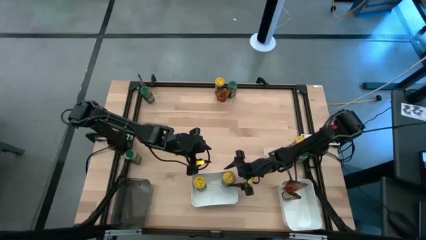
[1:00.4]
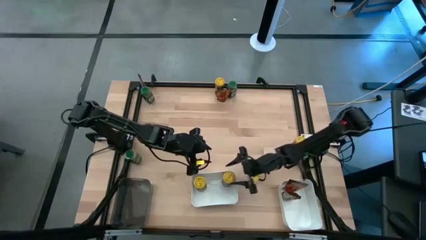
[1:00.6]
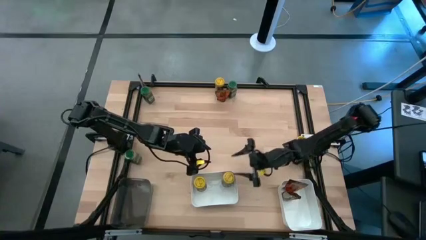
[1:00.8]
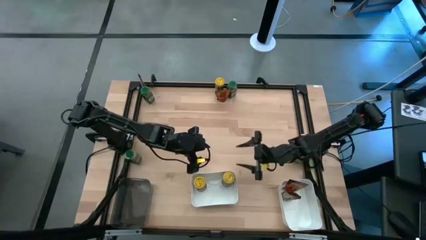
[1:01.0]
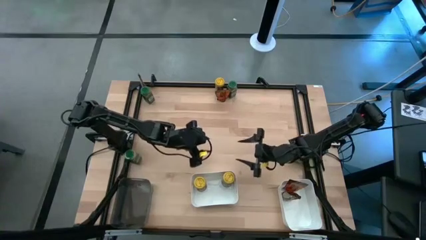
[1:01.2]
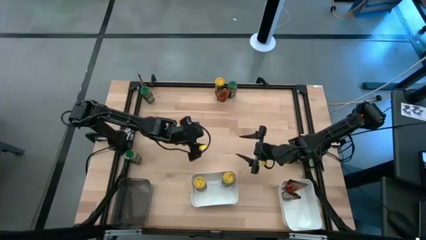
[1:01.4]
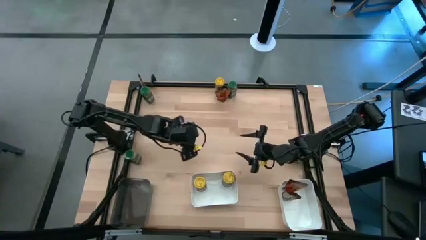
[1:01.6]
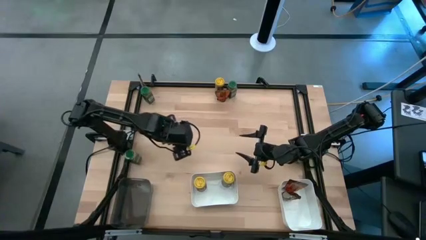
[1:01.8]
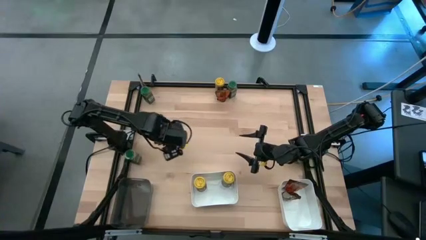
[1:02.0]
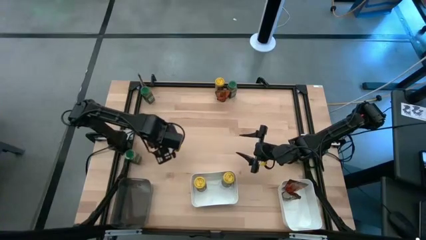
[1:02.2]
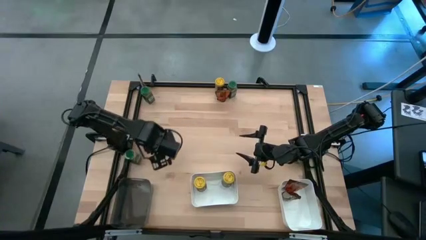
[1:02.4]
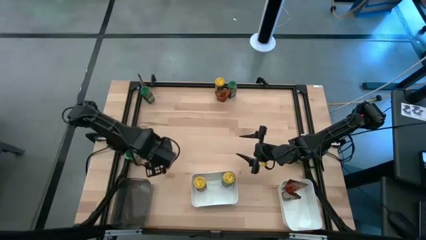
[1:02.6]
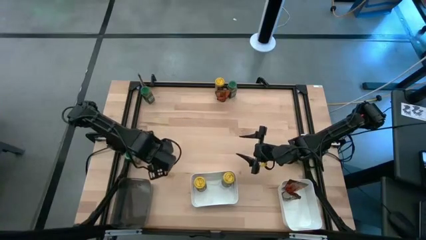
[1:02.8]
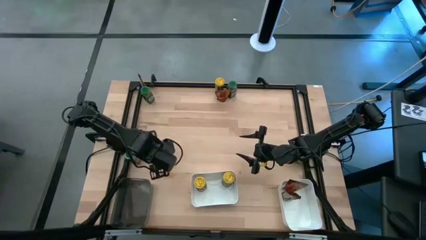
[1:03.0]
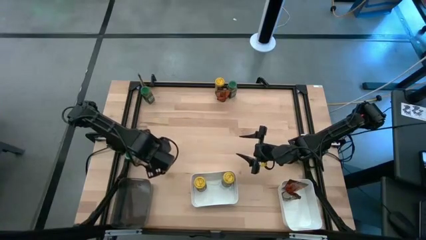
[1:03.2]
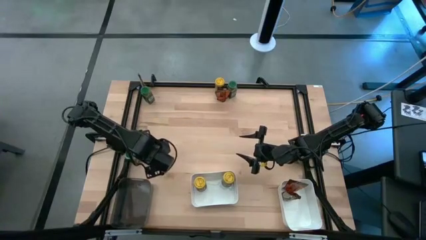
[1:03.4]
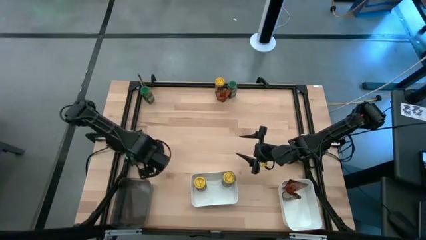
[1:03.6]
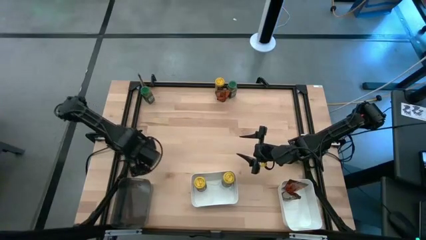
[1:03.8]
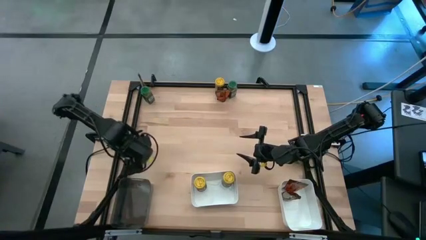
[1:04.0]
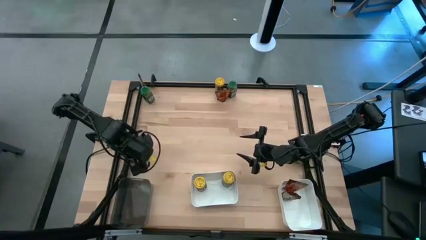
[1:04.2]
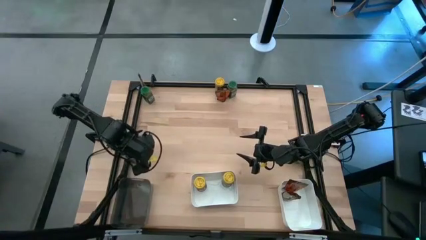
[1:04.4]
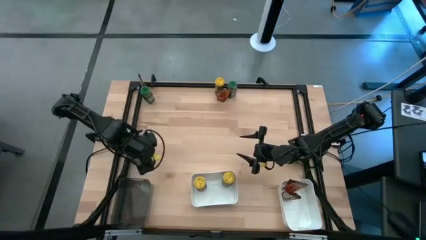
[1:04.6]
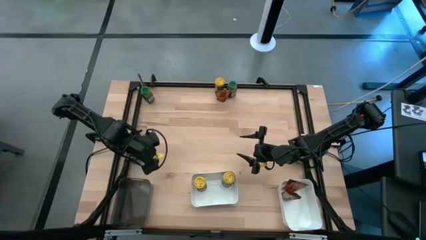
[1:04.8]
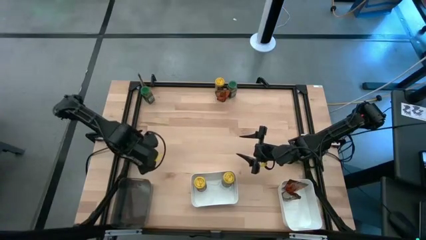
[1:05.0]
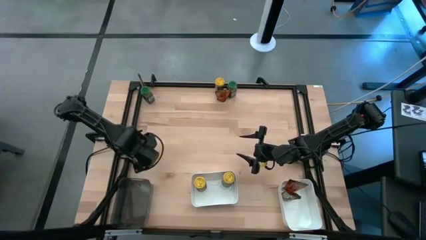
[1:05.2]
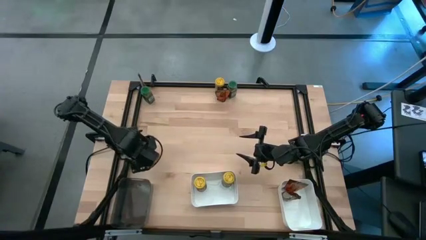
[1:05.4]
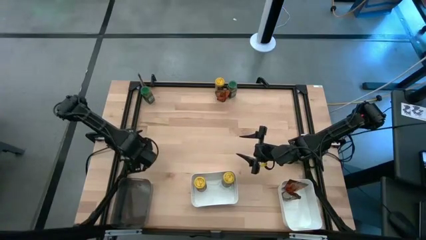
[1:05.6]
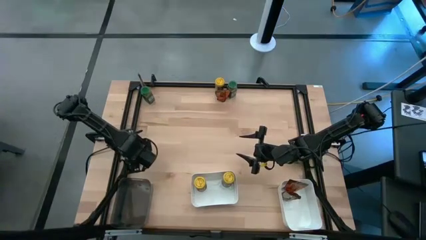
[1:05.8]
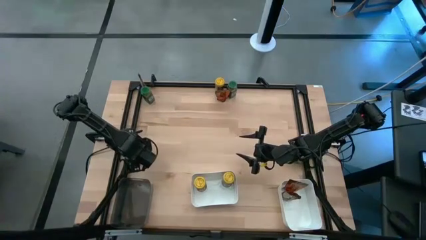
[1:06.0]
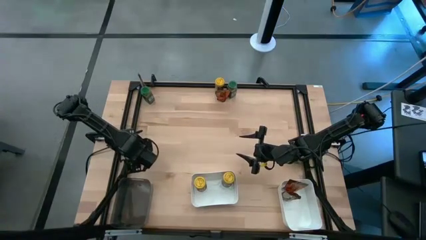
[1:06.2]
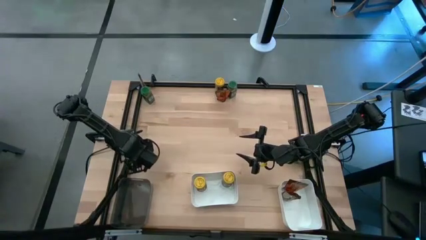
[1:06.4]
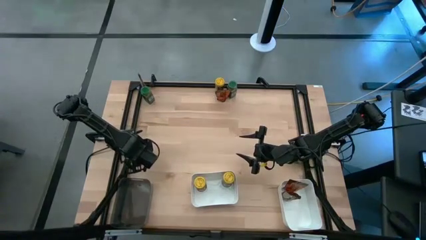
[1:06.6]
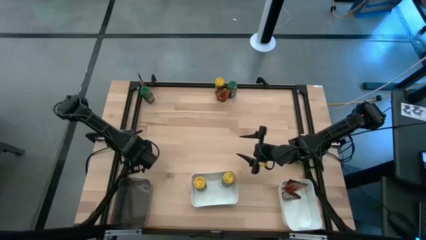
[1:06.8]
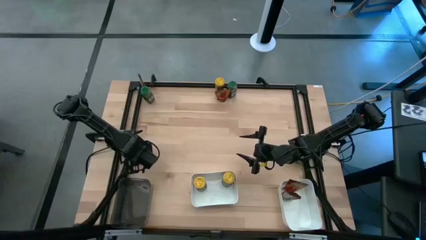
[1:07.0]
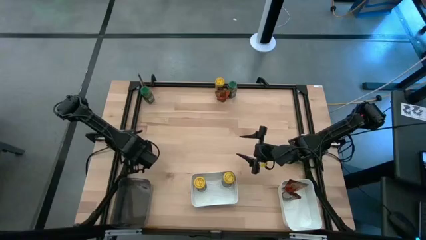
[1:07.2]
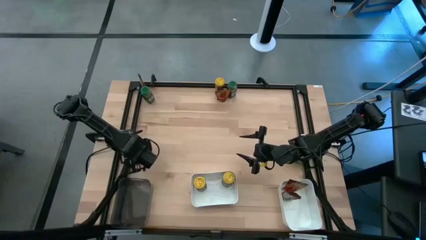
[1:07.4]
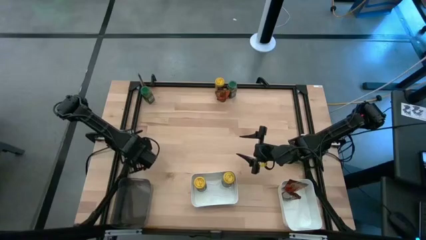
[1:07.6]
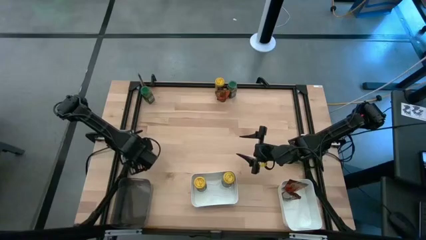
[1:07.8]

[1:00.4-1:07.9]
Task: Sort spices by type
Put the bottom left green seasoning bottle into the black bin

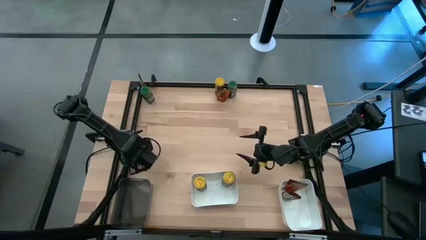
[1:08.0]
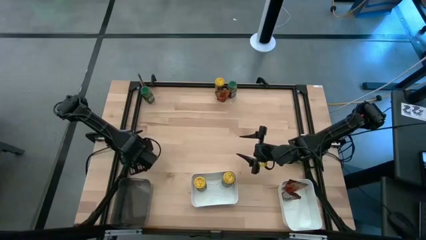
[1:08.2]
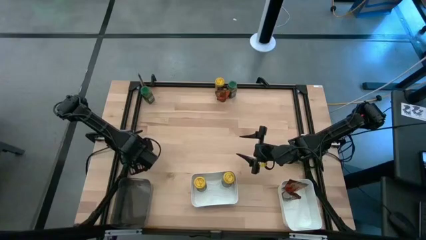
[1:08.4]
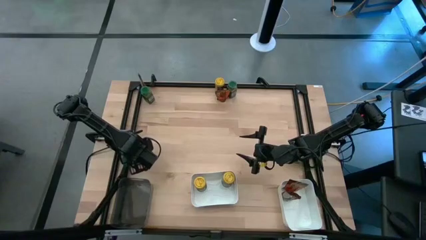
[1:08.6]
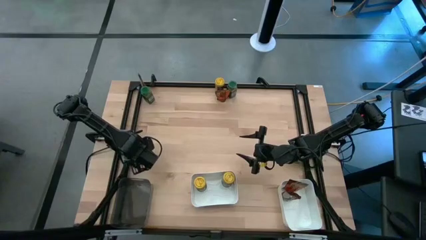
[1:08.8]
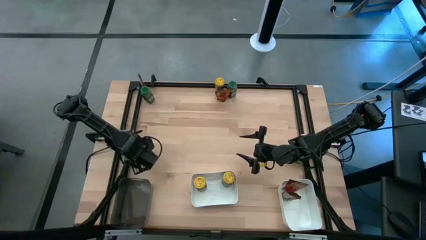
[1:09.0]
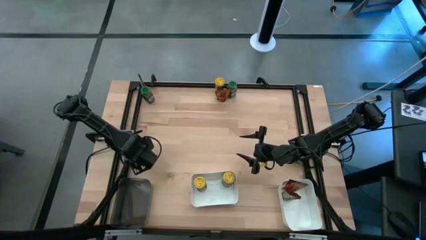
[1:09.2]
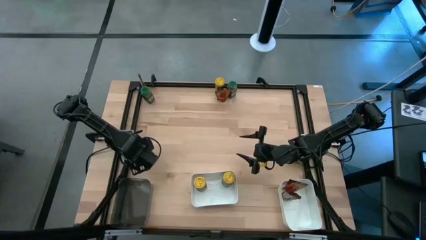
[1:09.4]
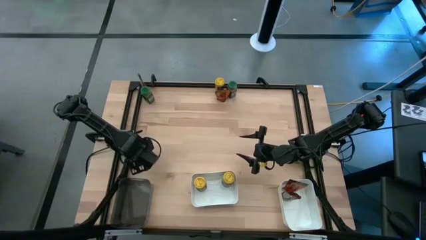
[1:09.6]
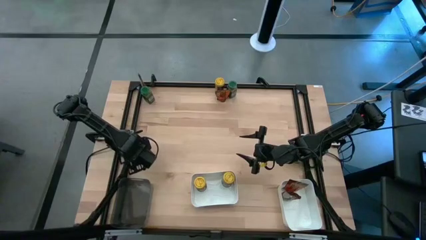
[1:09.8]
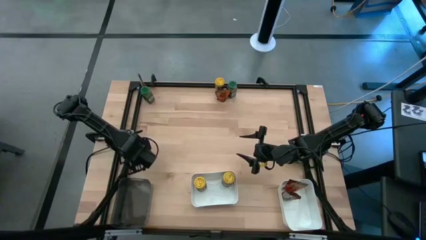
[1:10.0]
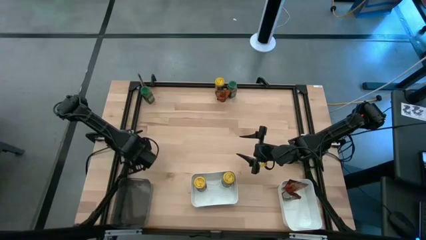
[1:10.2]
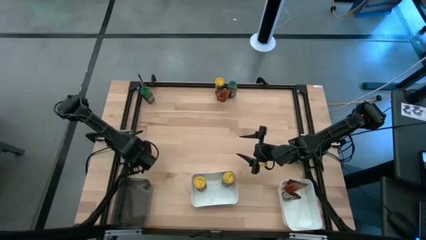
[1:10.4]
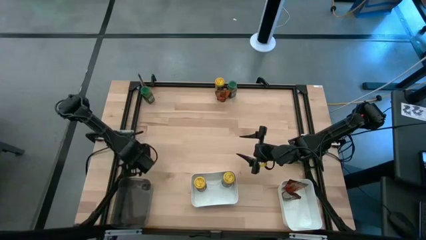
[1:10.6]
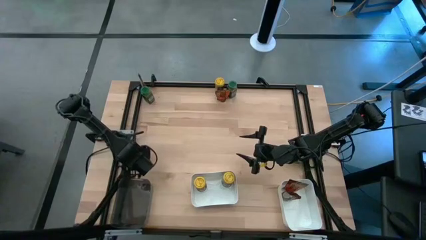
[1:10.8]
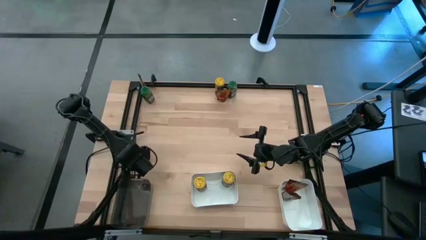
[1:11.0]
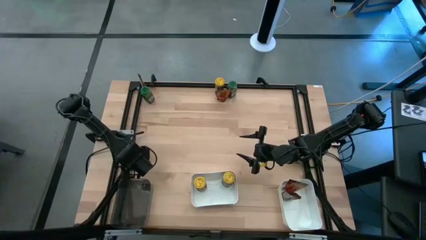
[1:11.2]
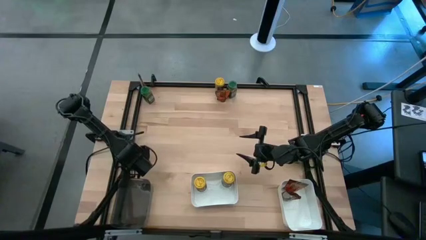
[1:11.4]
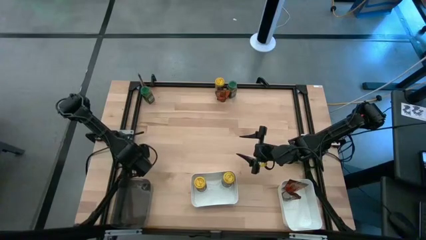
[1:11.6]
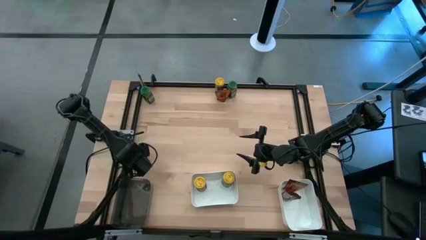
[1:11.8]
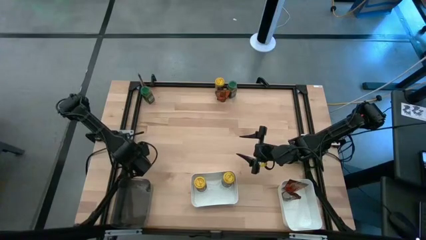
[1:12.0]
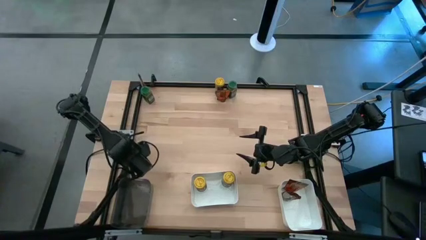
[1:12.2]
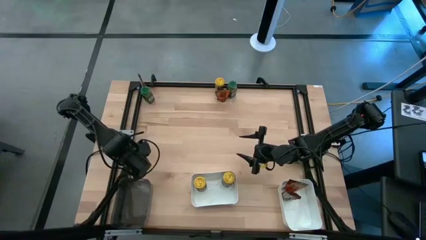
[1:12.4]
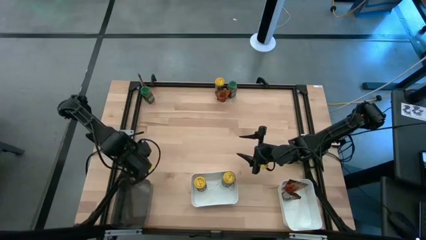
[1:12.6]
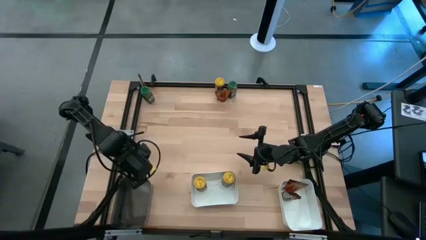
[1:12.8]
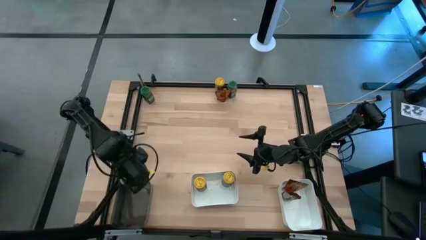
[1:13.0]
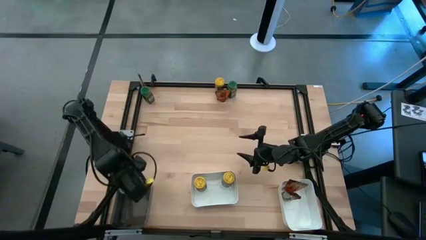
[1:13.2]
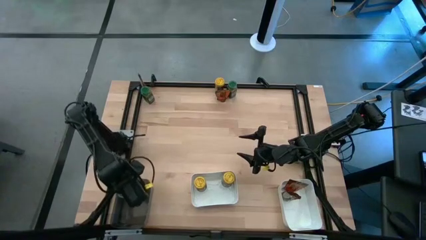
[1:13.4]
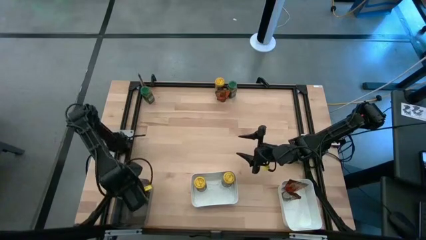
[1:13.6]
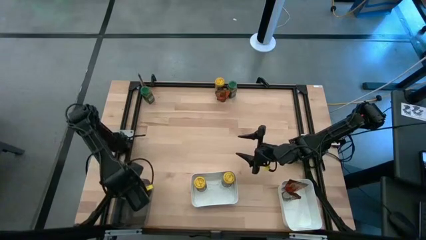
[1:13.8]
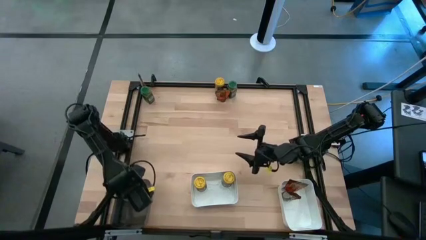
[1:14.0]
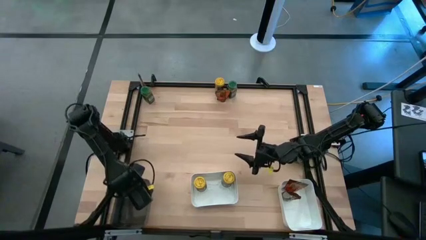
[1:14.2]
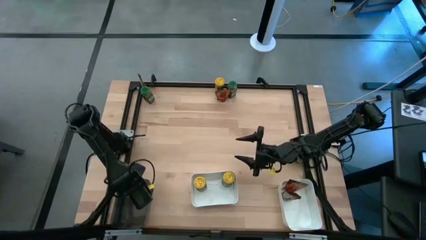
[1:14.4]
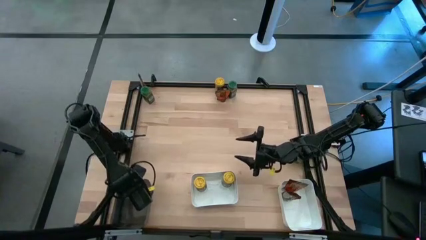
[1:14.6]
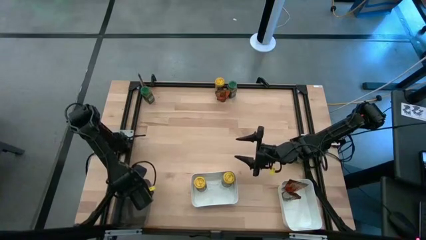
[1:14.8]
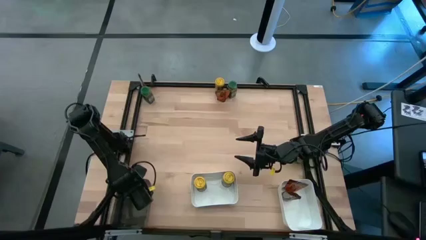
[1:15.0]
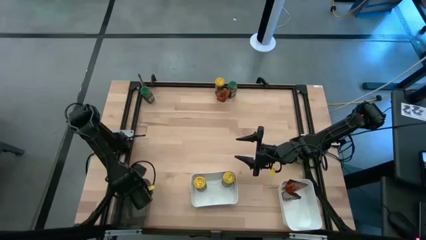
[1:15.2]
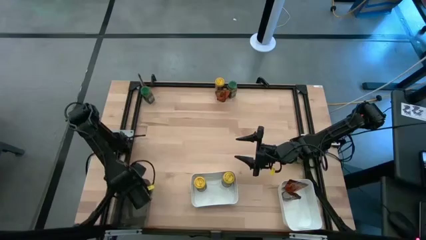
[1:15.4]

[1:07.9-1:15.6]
Put the bottom left green seasoning bottle into the black bin

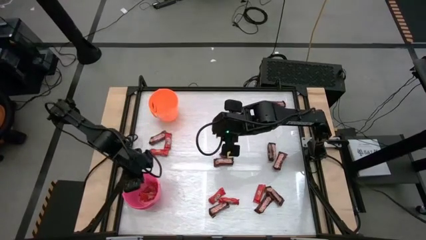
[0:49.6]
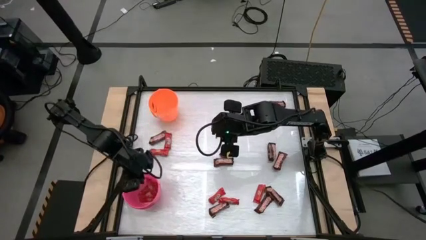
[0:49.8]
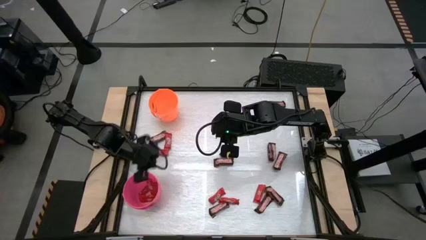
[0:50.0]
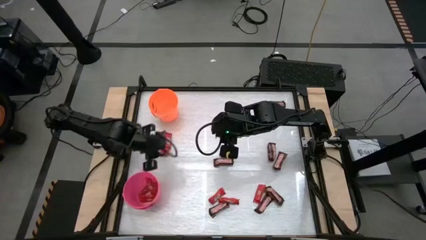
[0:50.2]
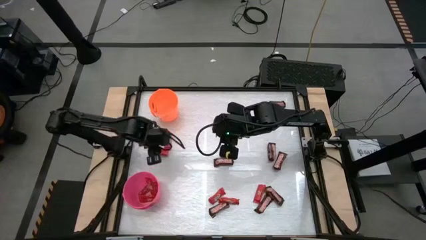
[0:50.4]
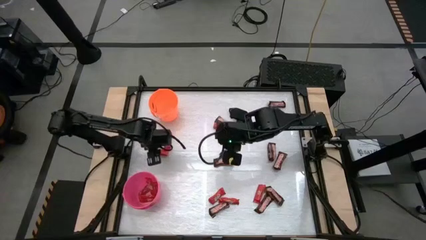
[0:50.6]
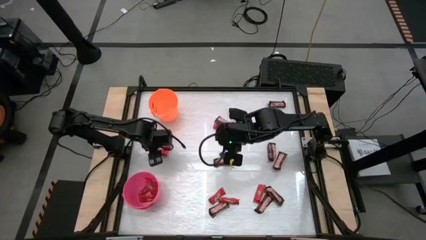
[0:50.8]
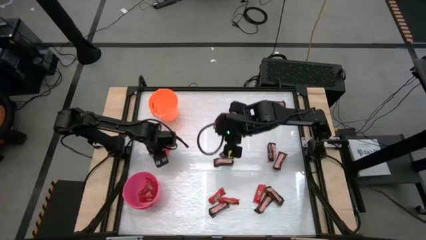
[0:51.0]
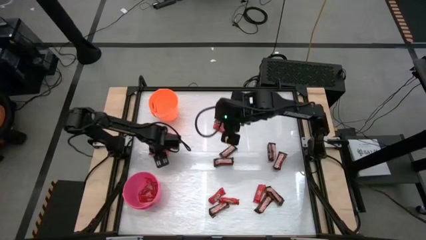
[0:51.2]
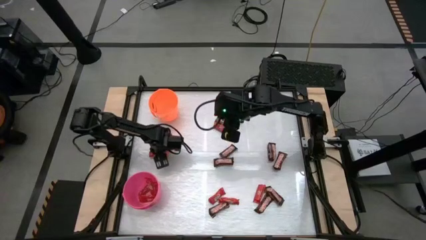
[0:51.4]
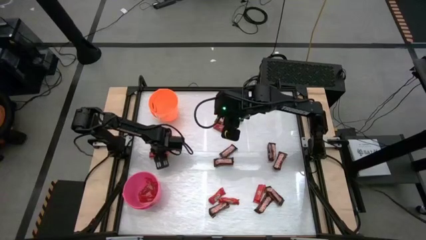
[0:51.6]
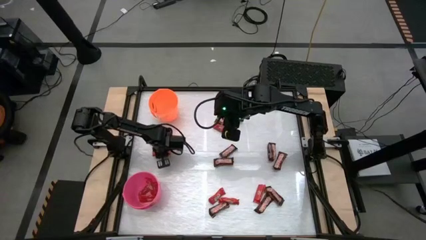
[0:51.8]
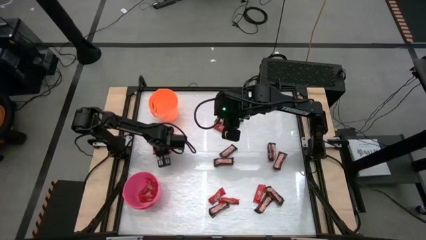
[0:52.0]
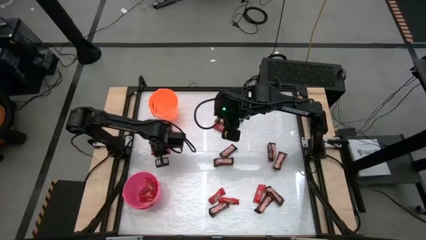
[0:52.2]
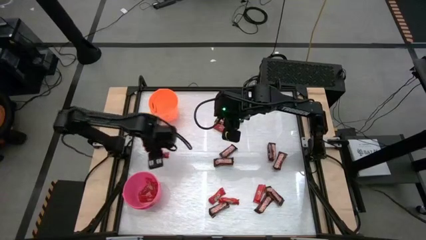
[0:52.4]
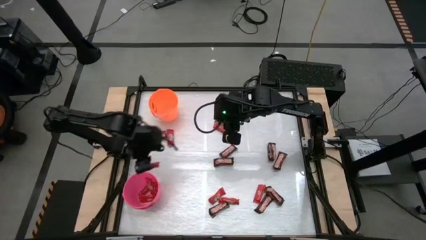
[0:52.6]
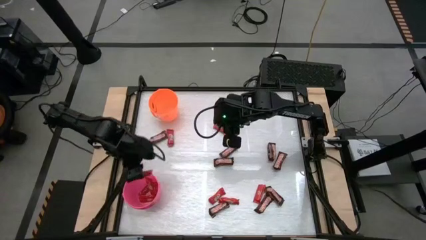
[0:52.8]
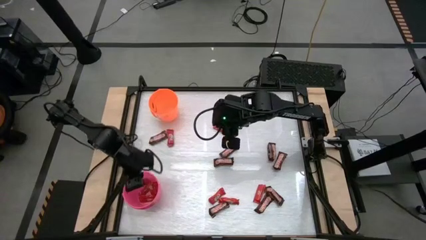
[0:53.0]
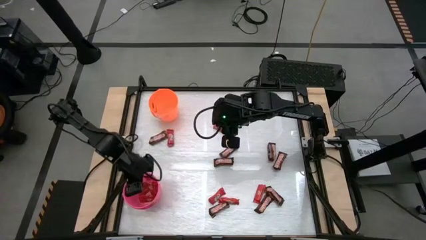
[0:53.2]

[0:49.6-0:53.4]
Task: Sort candy by brand, put in halloween buckets
Put the red chocolate bar into the pink bucket
